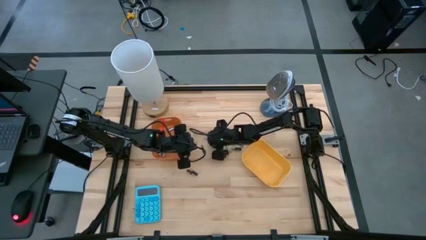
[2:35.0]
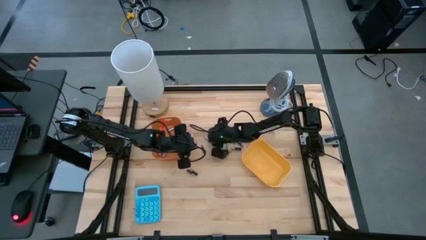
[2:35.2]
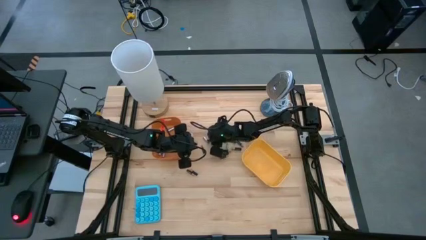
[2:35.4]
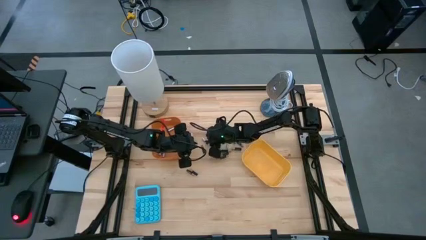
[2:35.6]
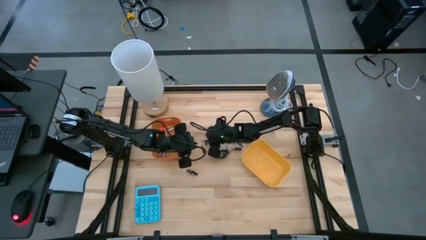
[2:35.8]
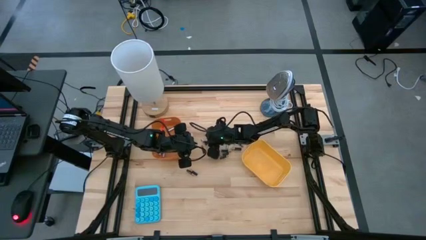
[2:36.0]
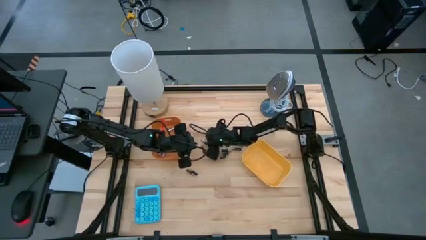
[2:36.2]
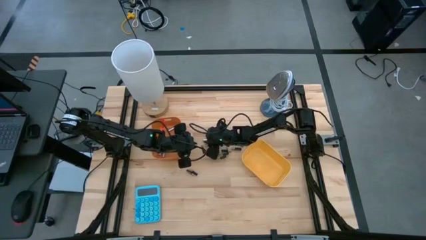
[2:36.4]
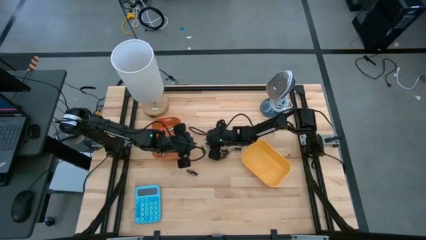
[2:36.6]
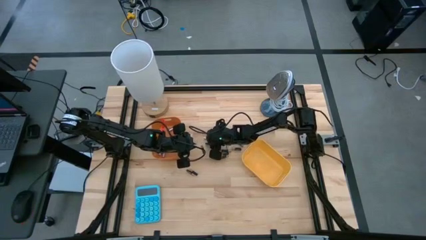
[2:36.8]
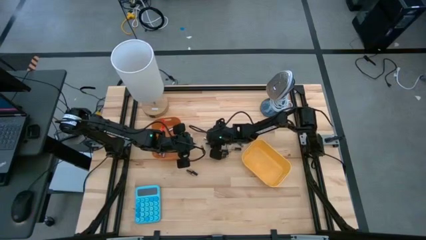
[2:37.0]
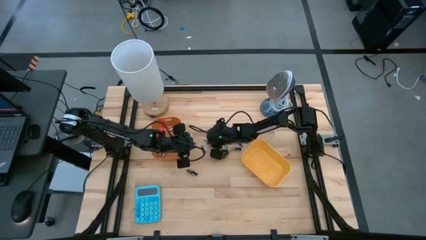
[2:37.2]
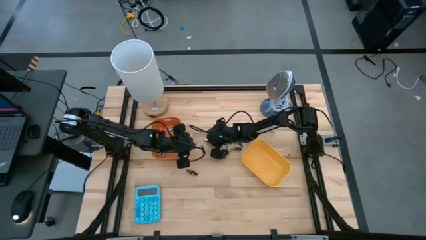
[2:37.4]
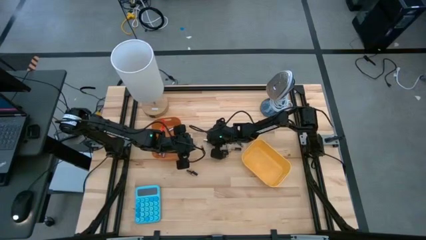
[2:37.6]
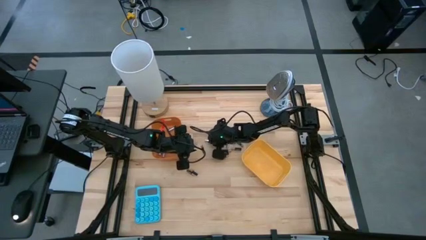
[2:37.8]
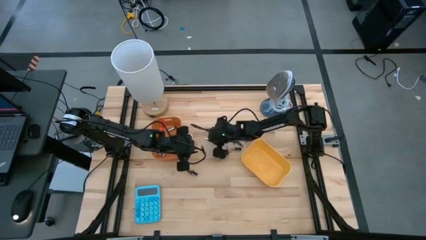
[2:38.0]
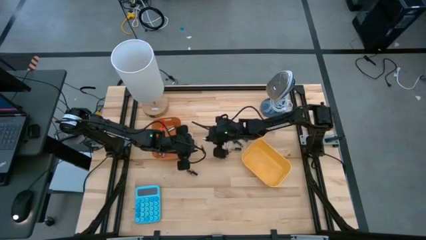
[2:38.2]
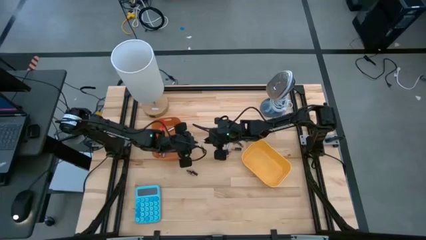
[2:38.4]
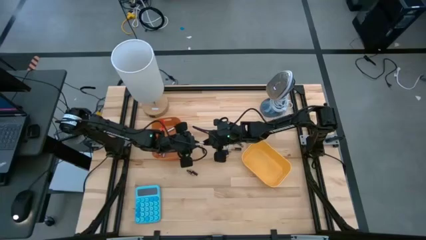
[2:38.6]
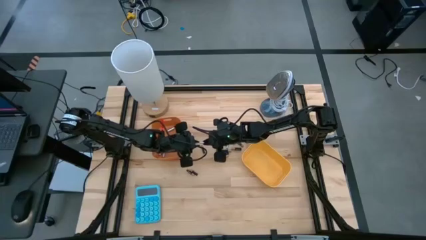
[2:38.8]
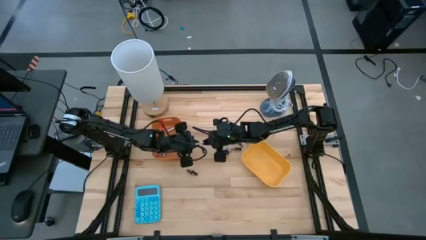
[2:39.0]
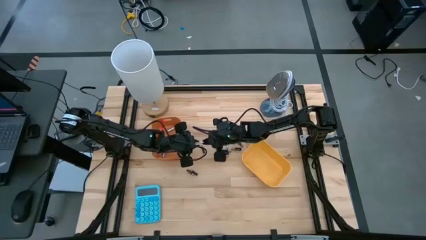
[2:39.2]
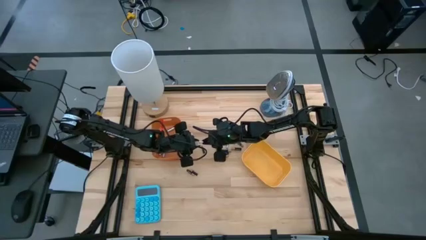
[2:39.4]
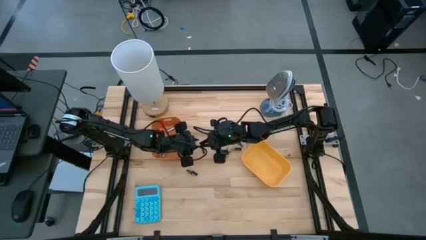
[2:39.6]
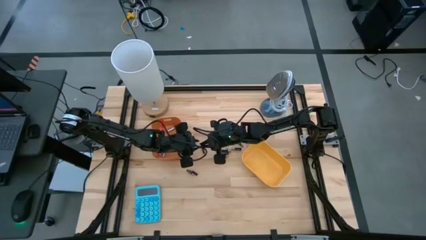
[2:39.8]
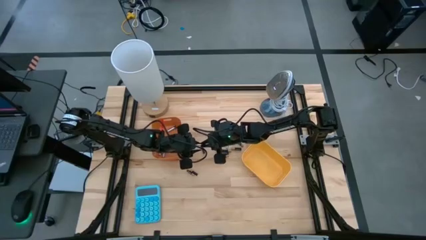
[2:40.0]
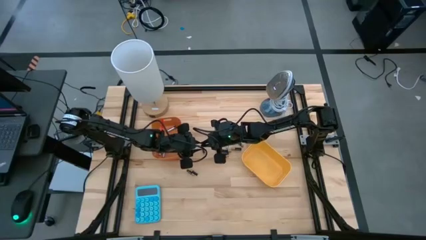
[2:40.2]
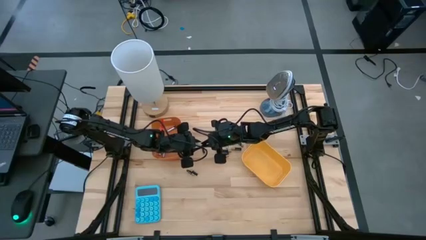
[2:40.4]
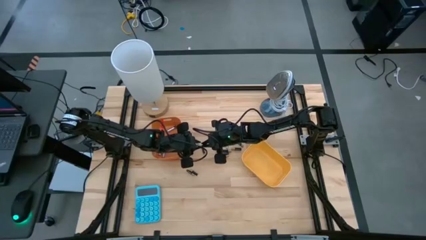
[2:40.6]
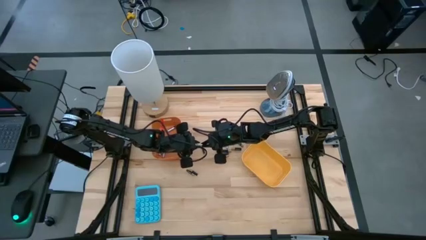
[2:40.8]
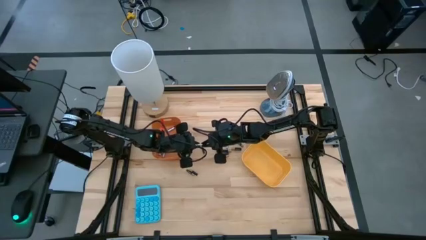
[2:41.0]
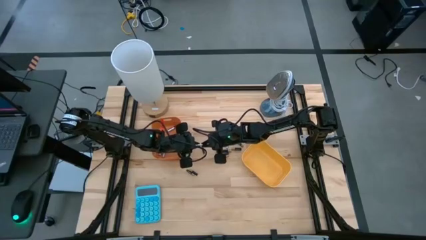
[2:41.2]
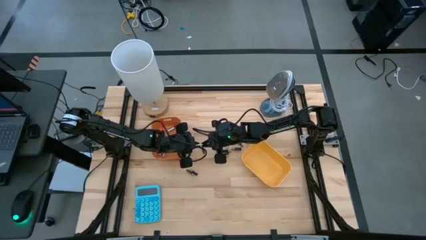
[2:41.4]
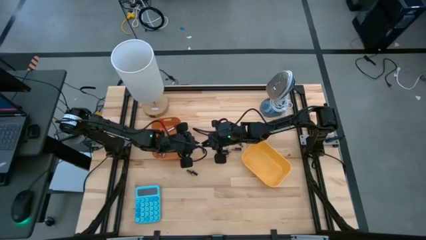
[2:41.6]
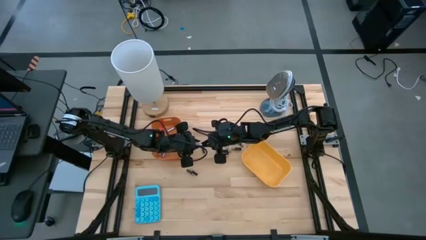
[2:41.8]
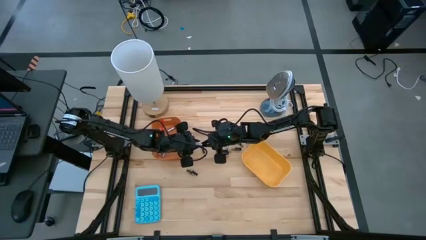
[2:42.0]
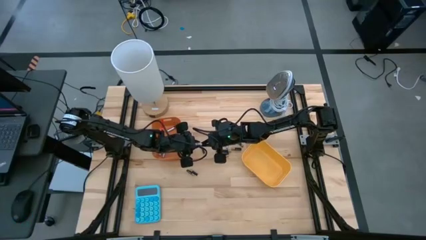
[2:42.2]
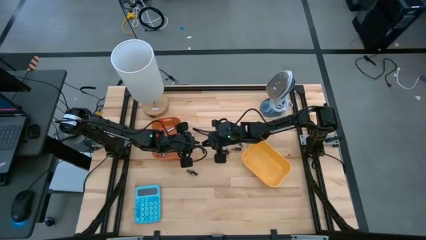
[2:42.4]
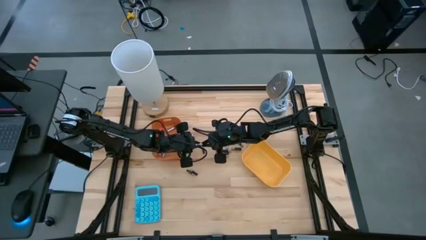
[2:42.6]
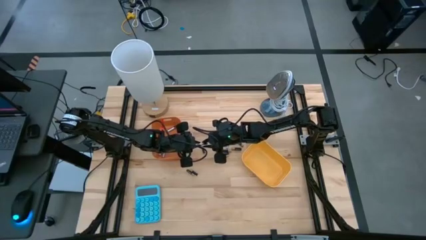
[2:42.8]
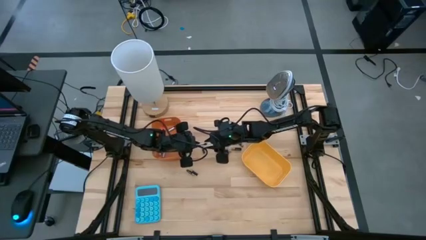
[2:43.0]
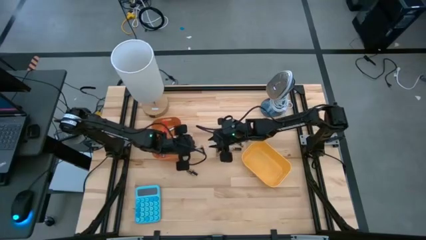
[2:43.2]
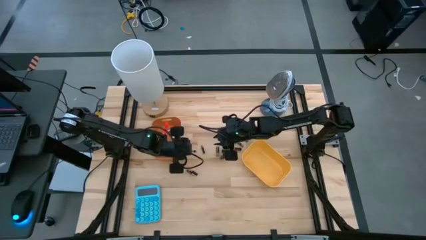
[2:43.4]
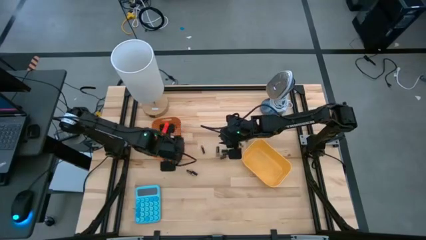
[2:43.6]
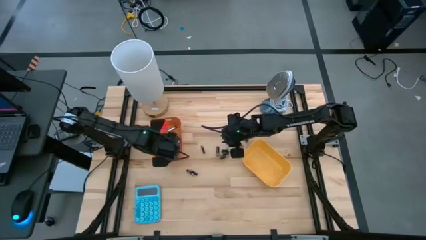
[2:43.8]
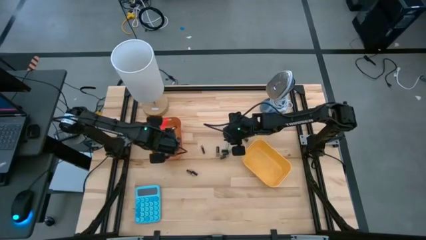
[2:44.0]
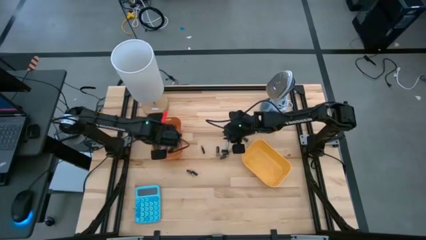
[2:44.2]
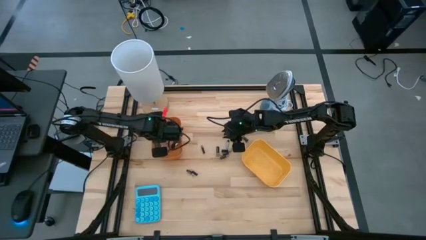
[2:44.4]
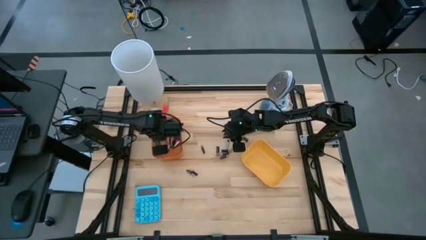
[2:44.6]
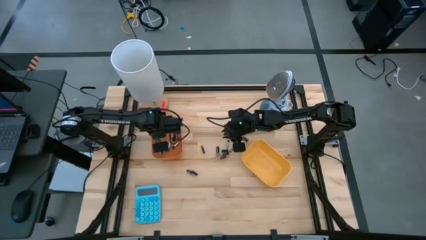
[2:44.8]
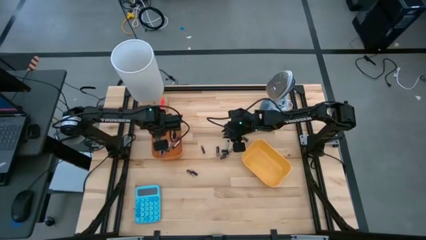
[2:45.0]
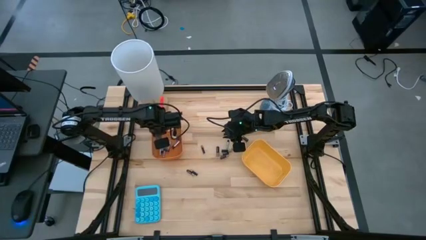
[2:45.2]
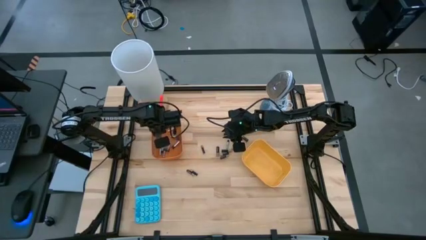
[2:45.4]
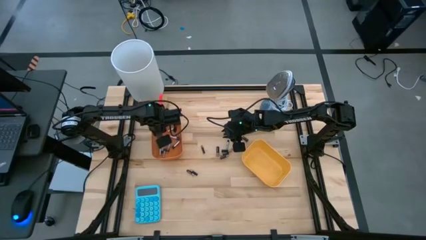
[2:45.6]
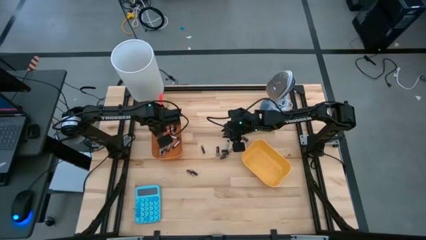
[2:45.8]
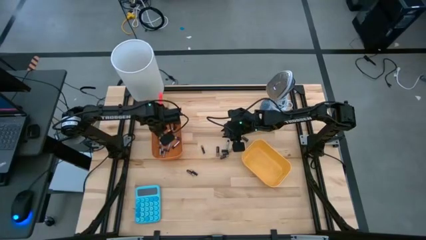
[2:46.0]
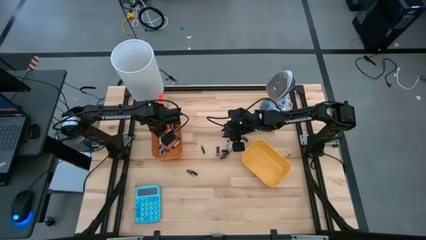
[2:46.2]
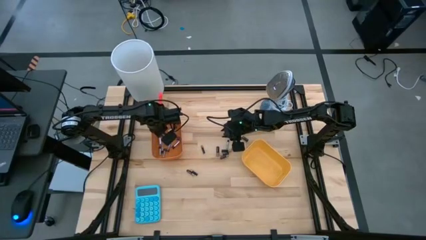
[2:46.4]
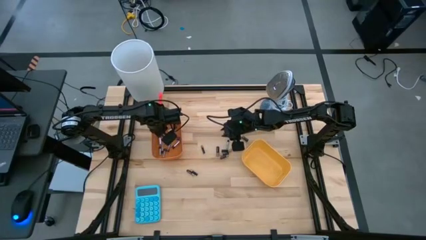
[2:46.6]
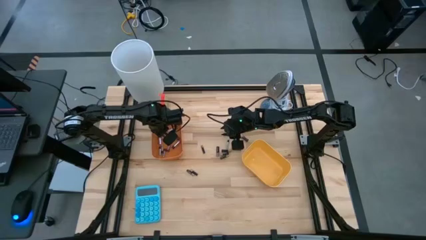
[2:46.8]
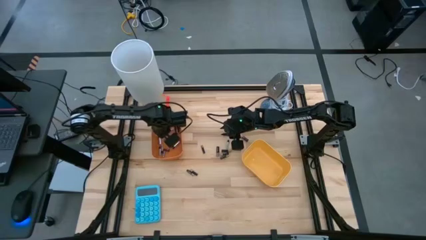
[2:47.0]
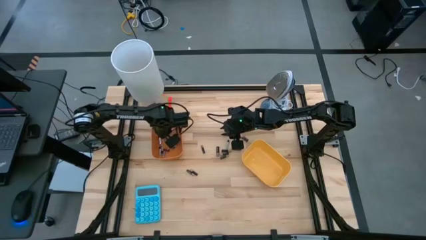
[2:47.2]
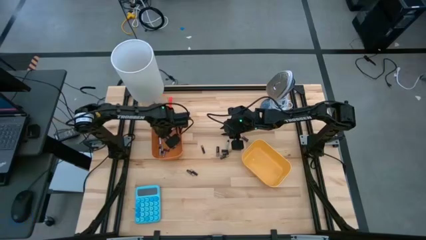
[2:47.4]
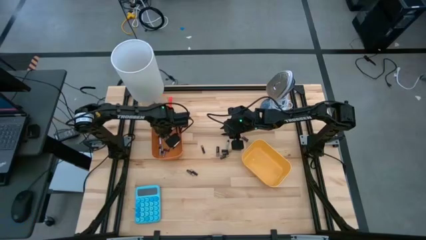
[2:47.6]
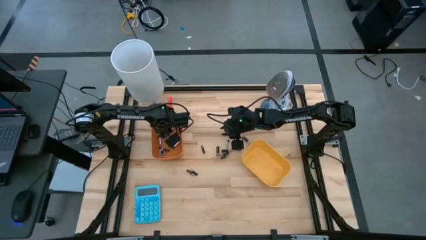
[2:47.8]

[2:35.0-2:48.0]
Task: Sort batteries
Put the silver battery into the orange bin

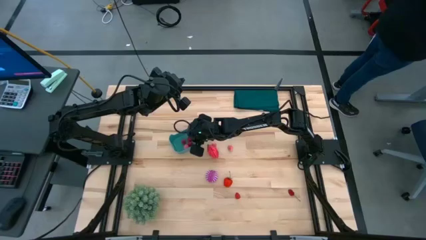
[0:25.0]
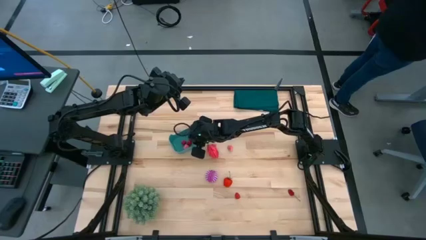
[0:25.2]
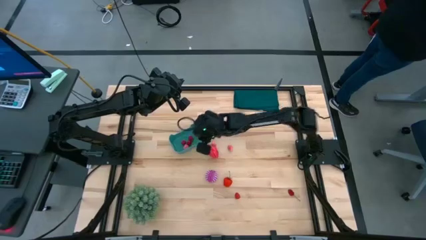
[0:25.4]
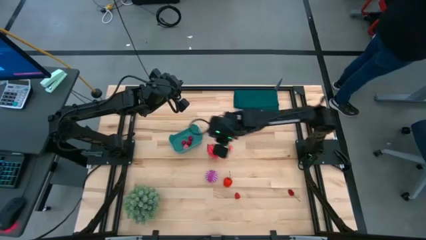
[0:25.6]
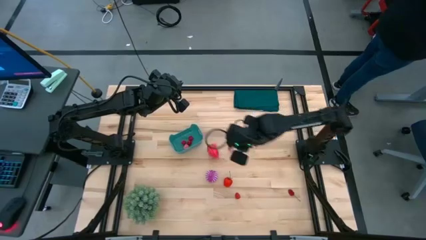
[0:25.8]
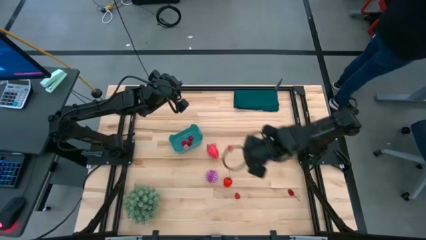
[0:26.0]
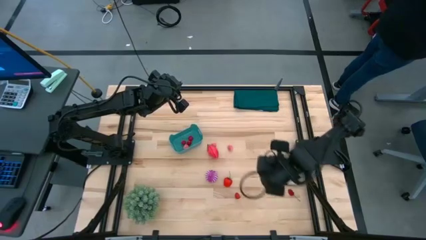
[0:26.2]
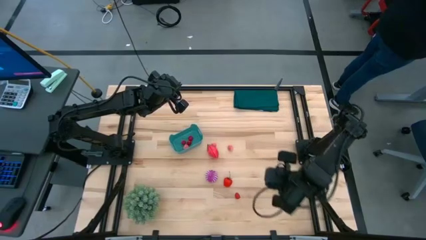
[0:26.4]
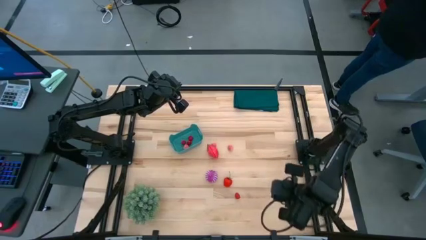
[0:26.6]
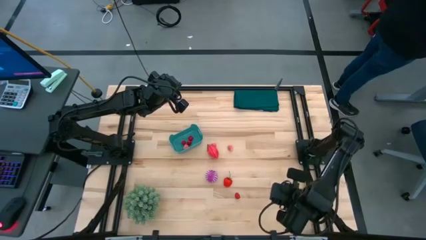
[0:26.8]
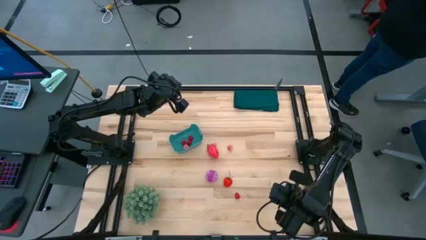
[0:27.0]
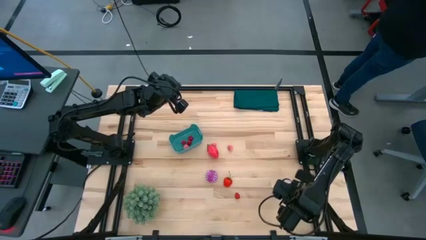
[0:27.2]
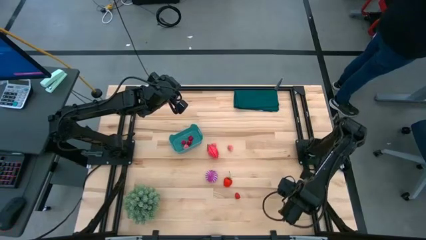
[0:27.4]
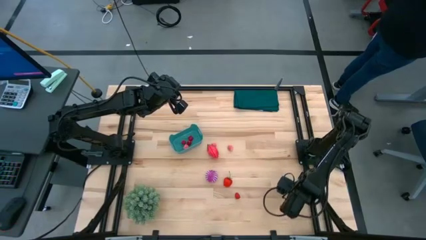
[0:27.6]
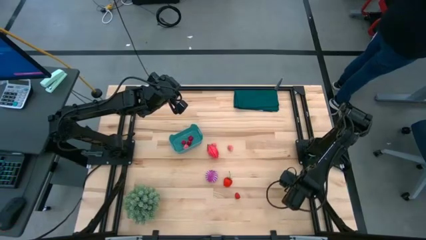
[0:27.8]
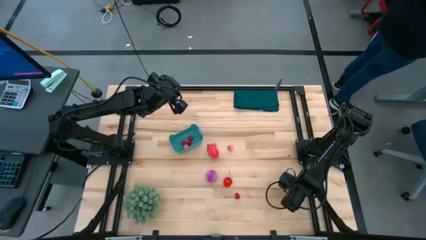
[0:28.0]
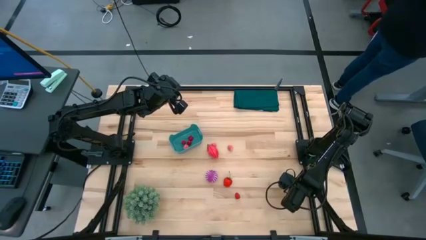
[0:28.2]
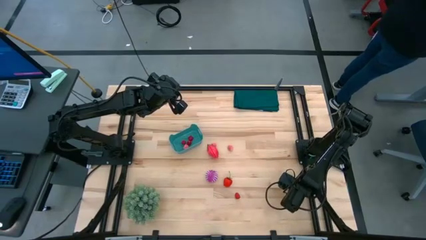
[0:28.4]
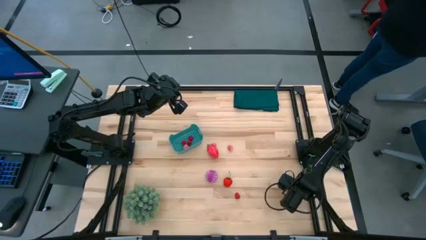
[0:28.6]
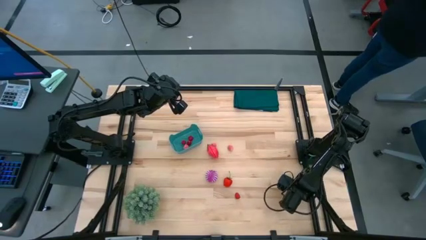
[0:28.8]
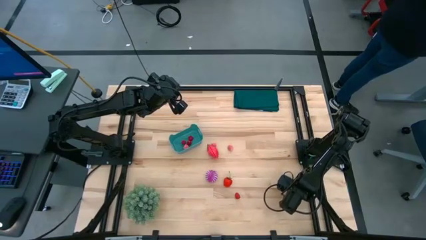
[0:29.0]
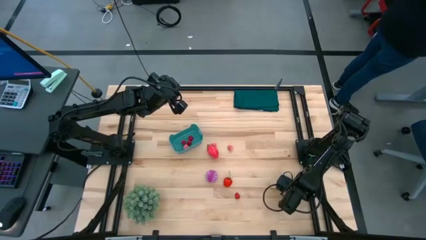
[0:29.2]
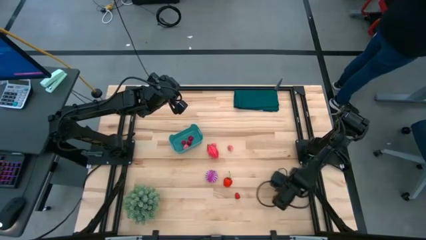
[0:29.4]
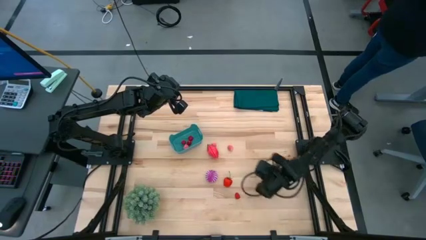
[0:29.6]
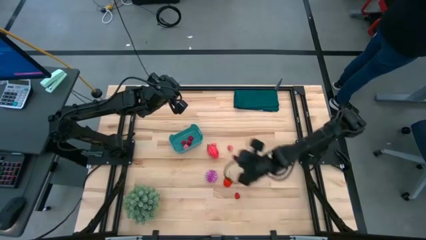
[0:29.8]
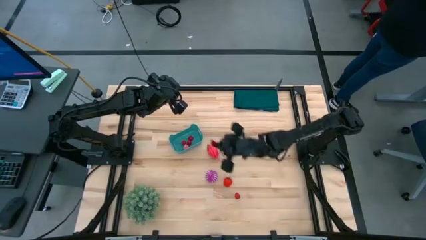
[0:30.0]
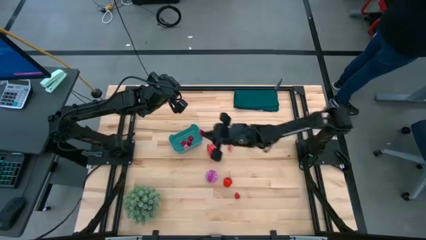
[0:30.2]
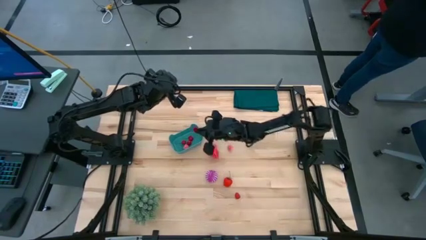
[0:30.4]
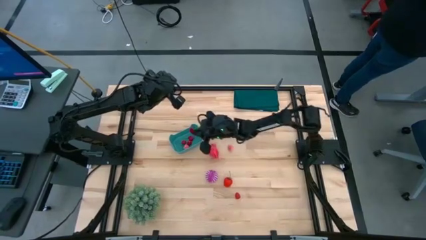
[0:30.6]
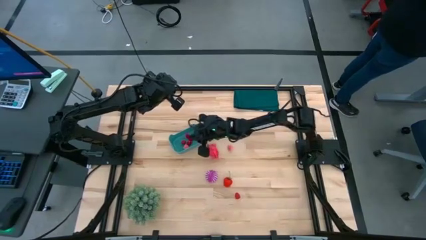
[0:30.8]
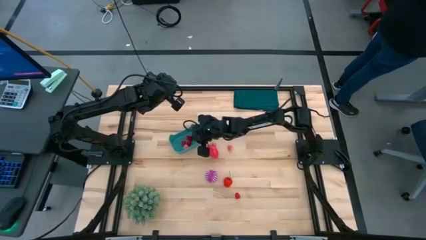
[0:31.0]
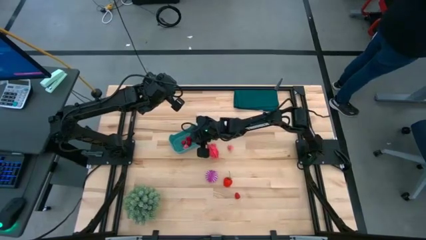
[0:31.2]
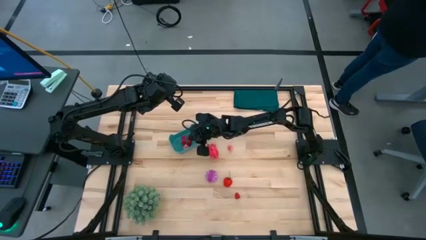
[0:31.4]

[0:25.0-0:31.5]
Task: Pick and placing Produce into tupperware
Put the red cherry into the blue bin
